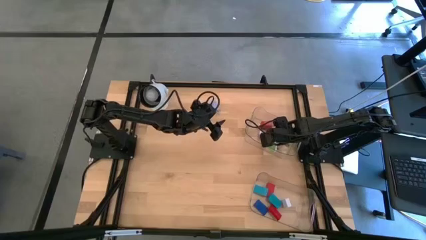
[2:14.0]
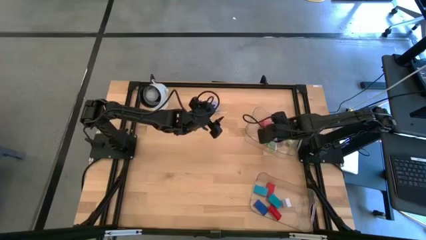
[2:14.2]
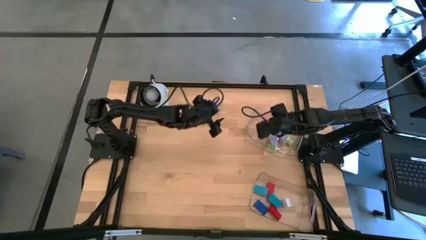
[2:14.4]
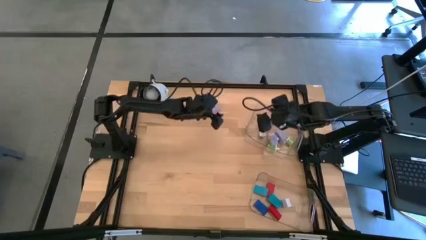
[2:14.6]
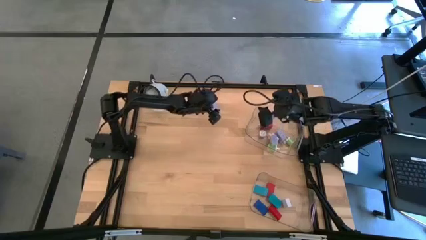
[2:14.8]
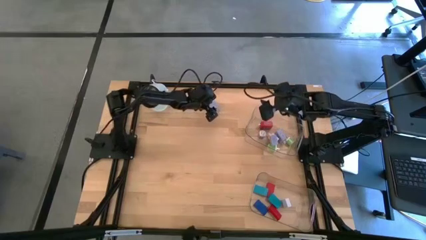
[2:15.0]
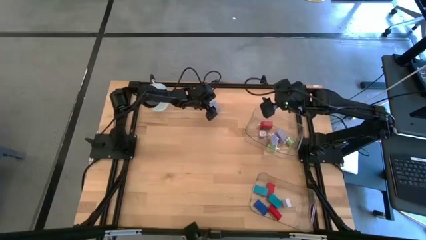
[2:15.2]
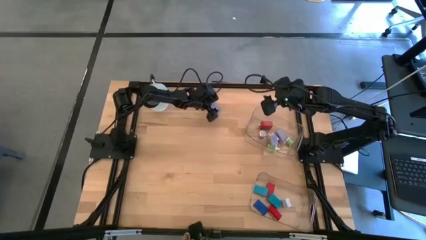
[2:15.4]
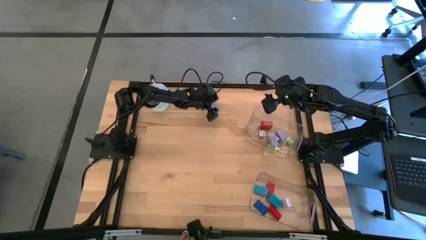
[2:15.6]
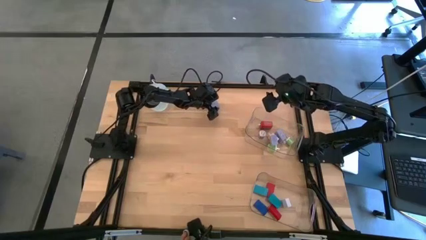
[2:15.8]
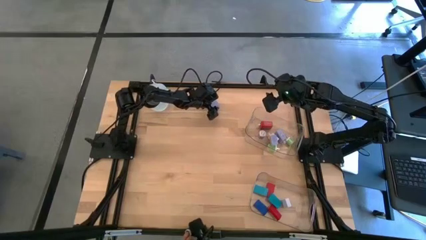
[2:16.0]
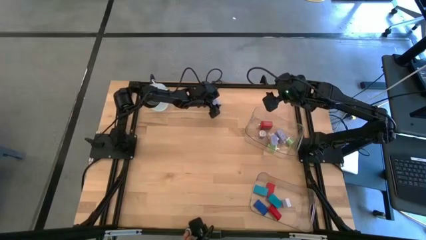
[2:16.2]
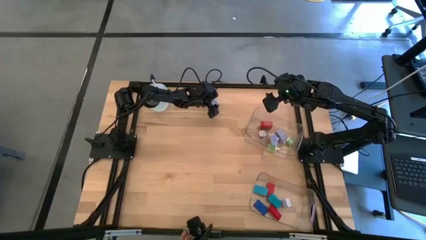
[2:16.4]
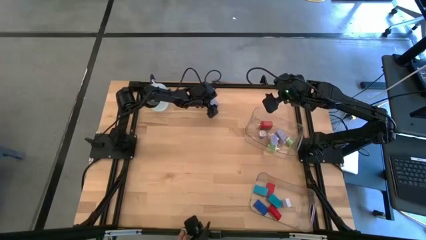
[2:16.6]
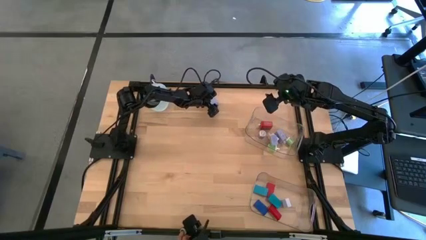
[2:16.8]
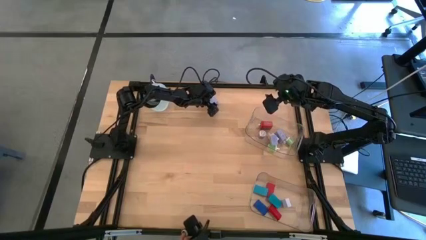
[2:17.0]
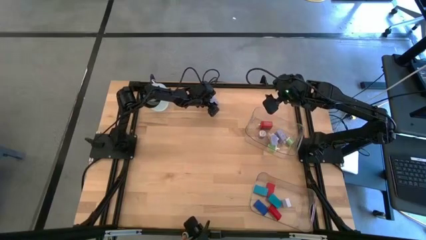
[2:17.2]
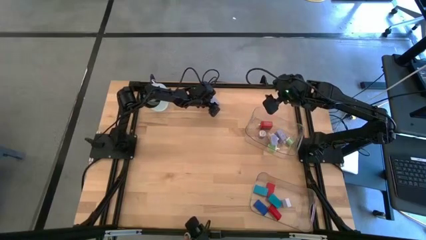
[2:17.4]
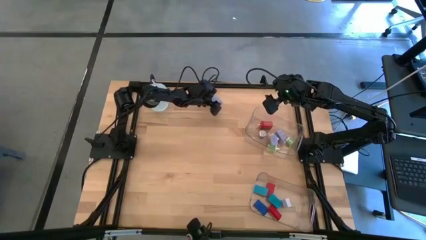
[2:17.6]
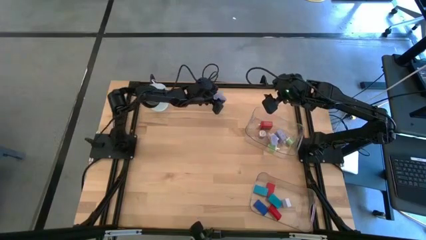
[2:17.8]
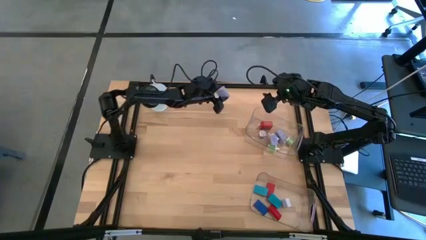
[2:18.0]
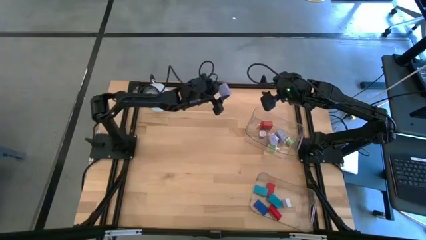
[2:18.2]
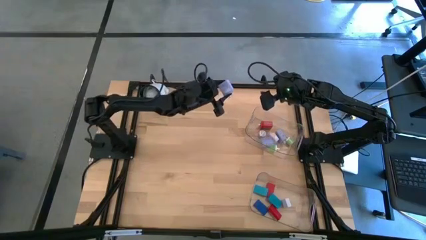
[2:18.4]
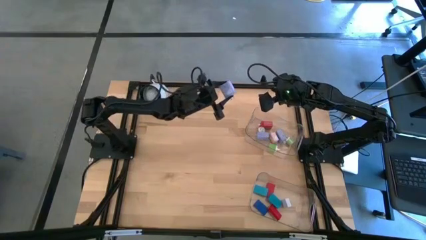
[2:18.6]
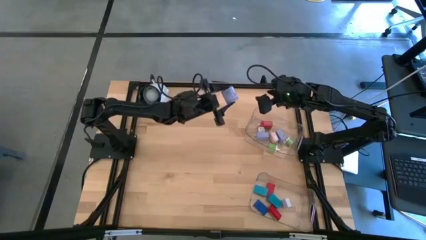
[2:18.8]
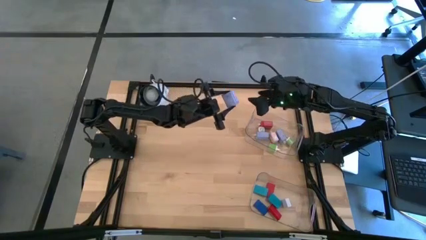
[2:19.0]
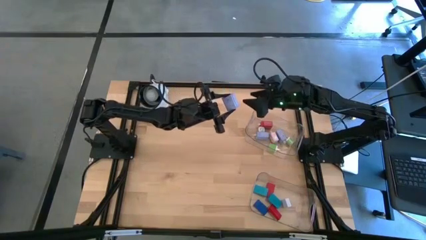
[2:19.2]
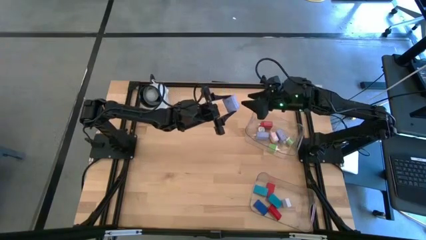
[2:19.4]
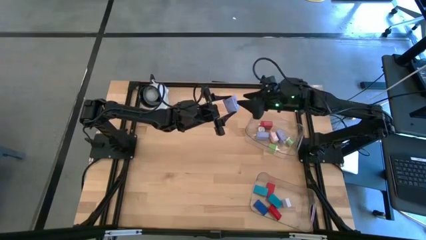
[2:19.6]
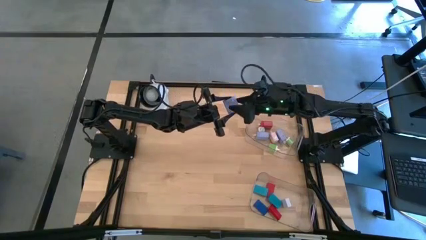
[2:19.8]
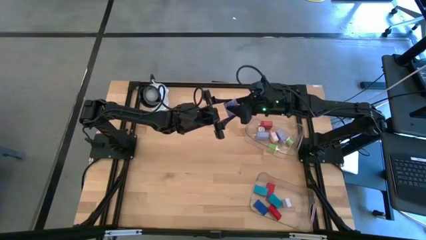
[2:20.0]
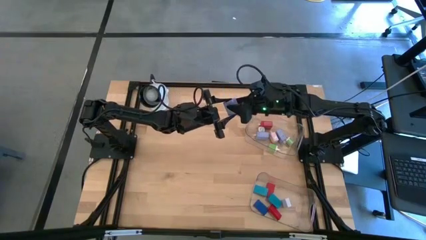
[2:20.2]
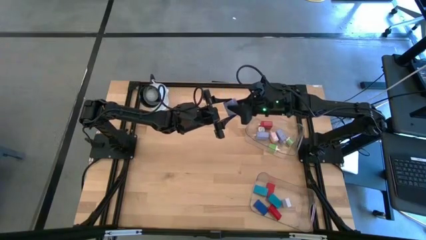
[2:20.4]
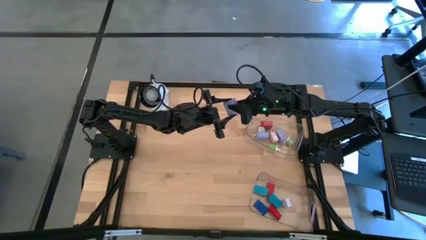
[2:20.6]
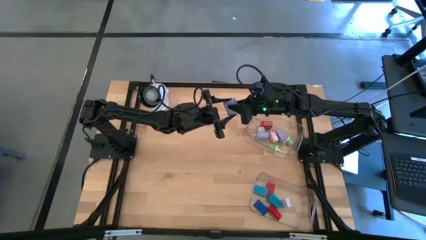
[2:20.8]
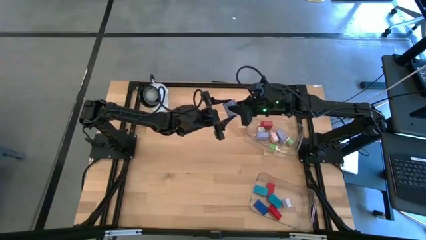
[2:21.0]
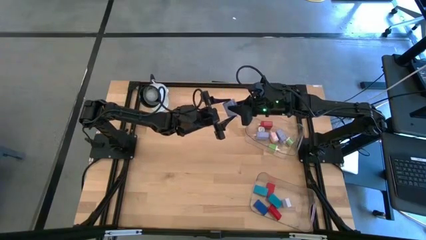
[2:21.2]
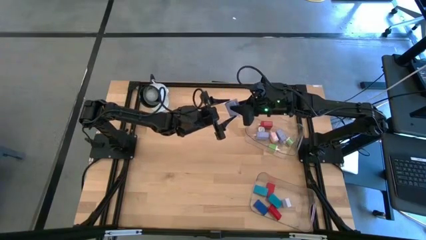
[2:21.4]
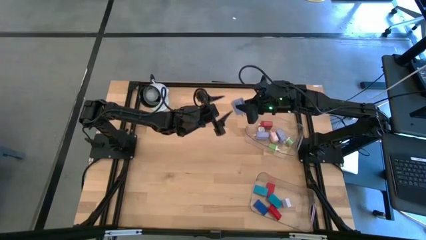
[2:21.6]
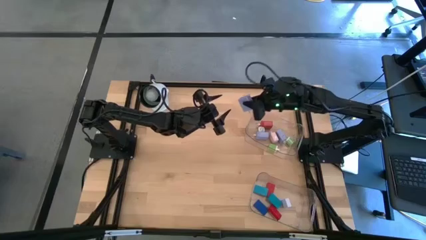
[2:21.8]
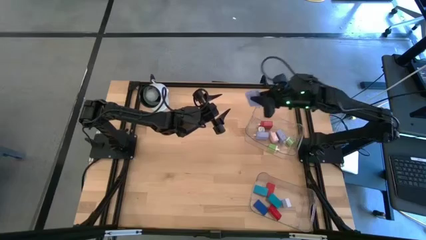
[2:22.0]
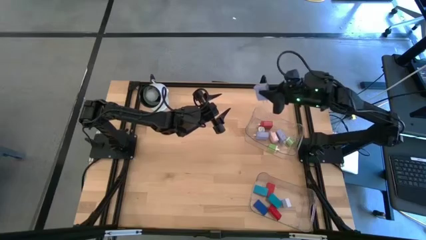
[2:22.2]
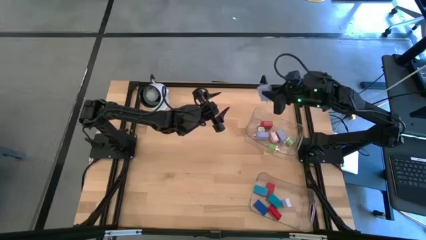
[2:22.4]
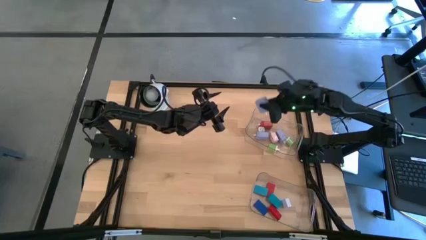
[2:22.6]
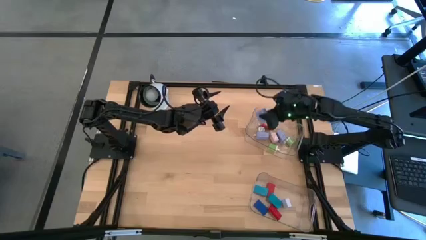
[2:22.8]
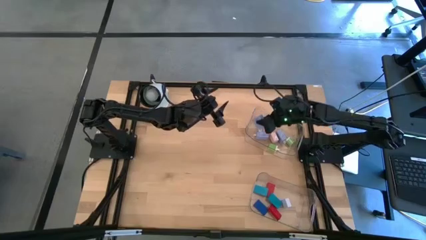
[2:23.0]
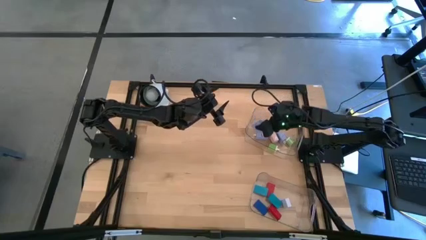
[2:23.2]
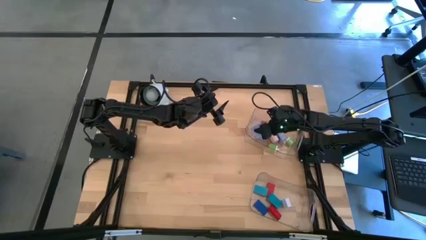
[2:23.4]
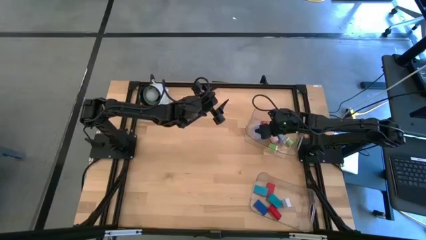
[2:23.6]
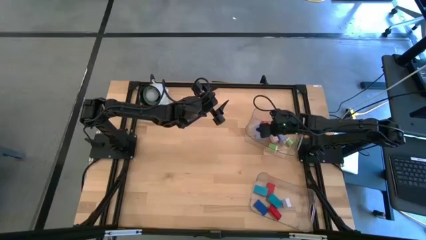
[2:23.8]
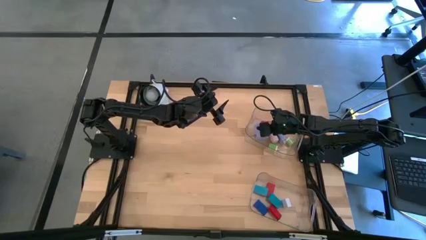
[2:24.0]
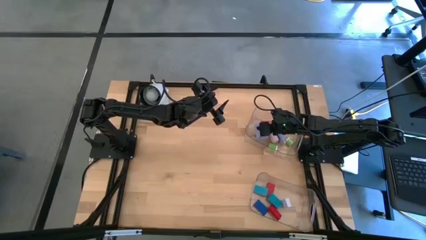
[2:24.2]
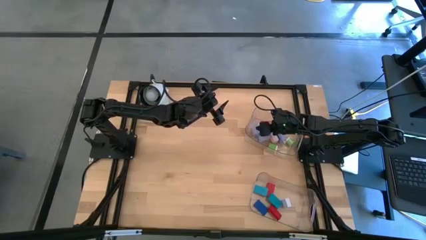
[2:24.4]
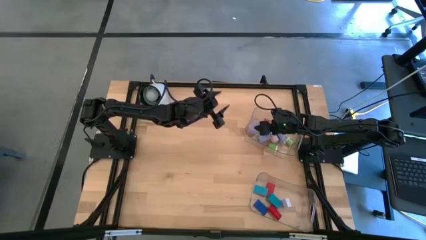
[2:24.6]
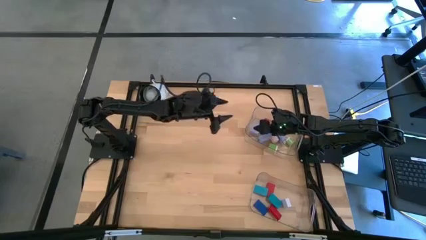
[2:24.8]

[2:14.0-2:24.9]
Task: Pick & Place Office items
Put the blue charger adapter into the top transparent bin

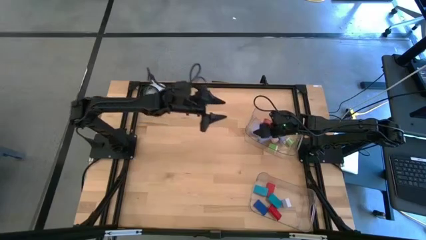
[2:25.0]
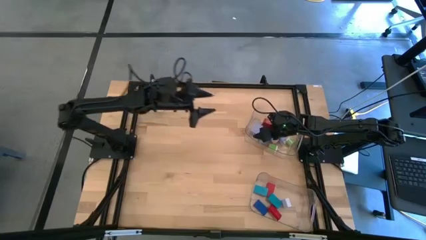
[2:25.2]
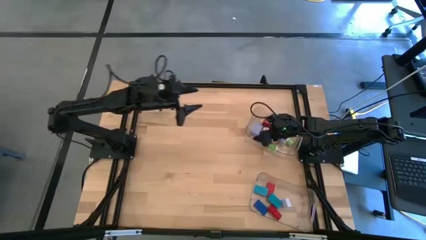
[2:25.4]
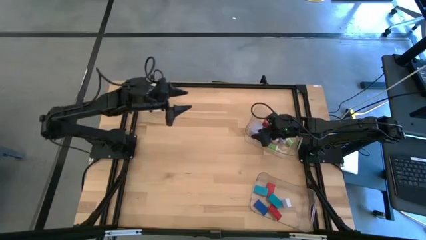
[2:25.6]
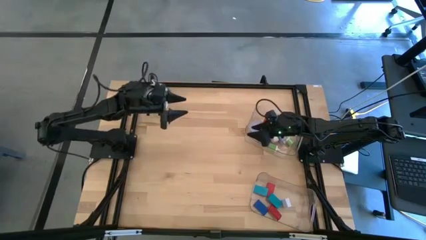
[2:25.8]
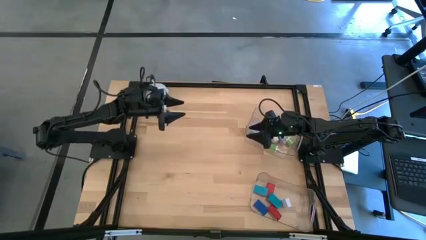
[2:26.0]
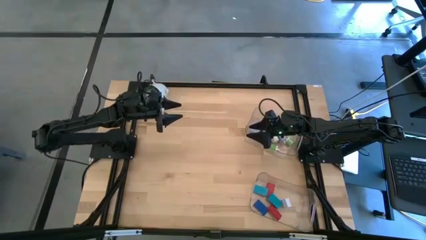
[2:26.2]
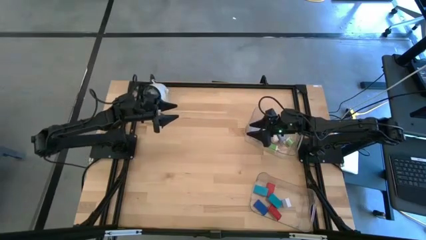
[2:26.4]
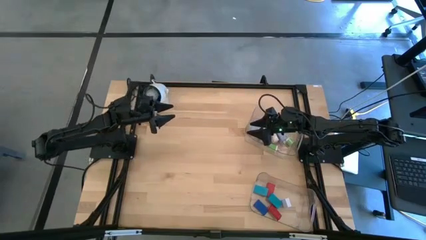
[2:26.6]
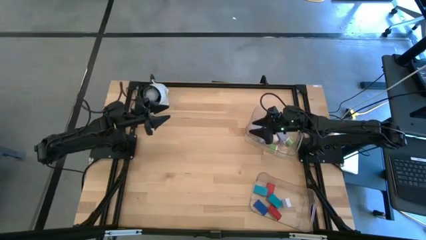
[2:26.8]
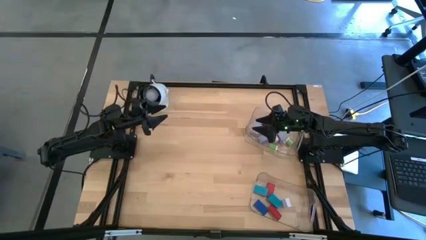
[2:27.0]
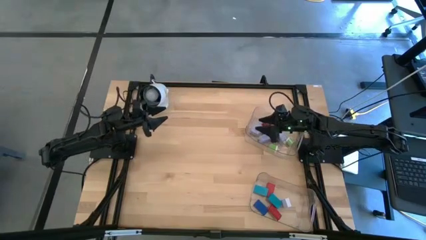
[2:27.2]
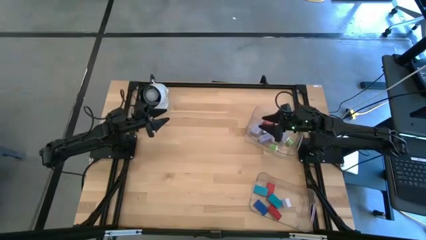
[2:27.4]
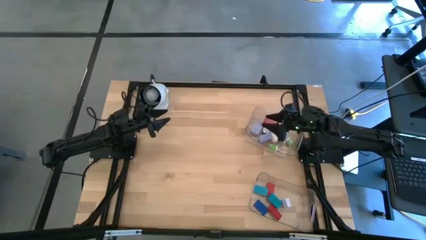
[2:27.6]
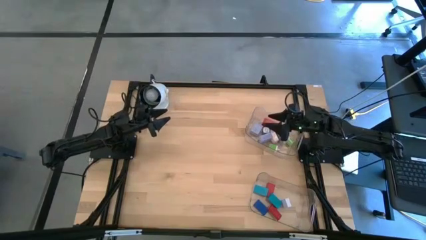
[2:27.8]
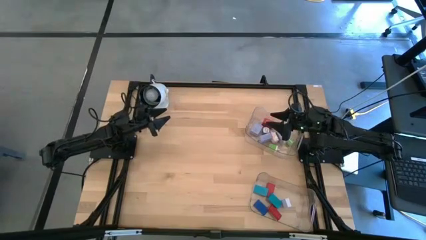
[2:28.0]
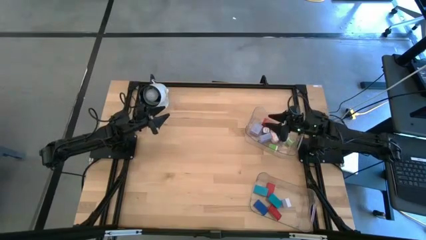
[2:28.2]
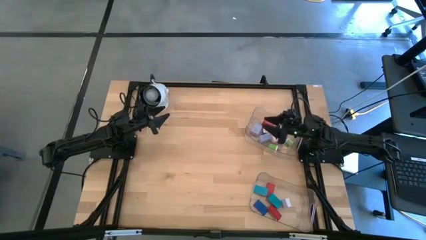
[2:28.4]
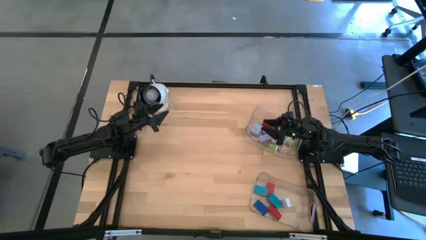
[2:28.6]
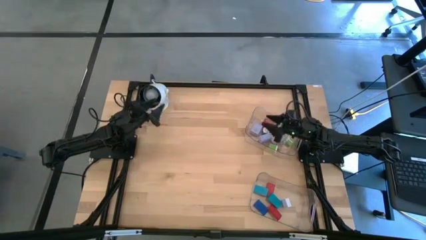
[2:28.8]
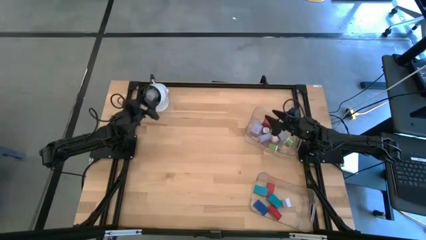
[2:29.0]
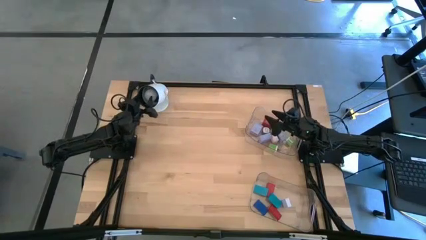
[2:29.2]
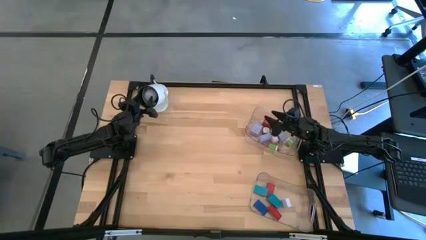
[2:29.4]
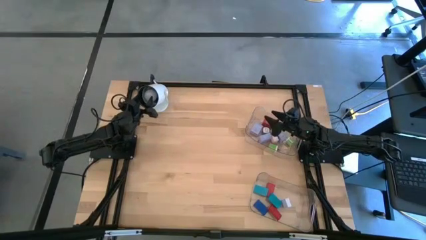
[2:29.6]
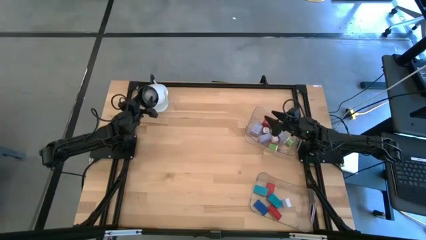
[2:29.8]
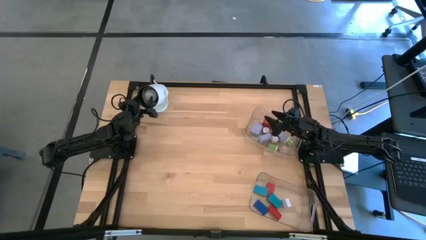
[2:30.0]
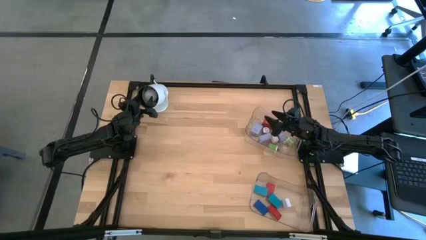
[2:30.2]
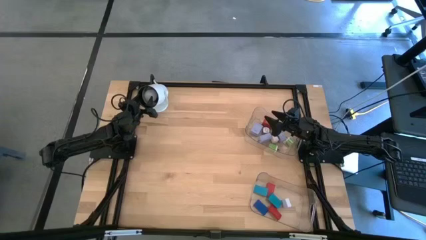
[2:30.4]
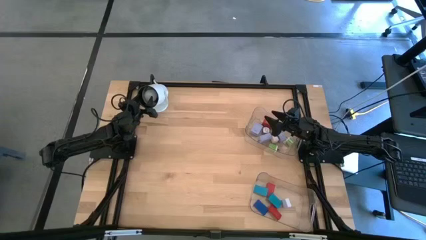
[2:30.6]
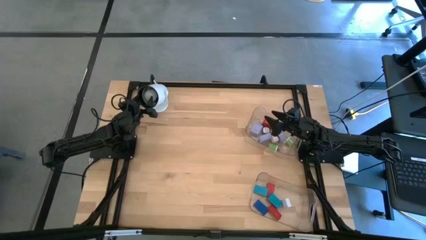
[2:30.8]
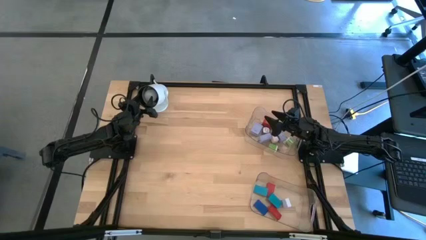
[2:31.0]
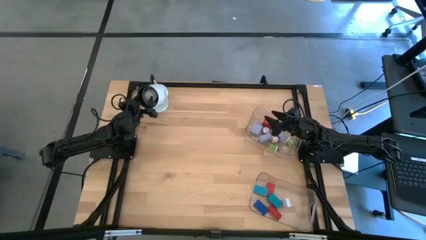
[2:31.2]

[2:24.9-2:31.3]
Return to Home Position
